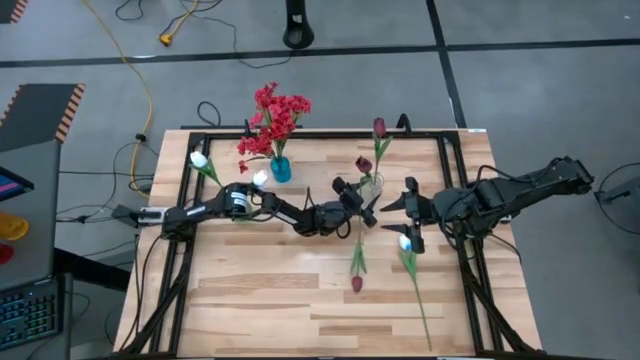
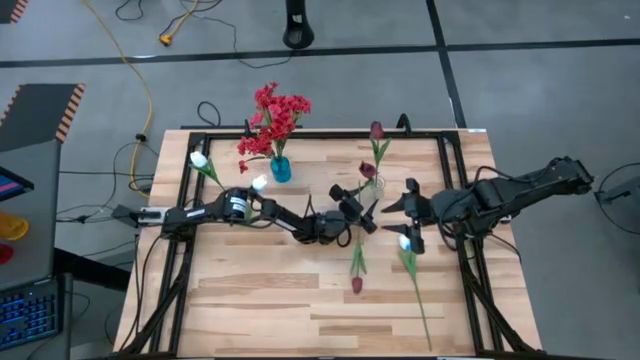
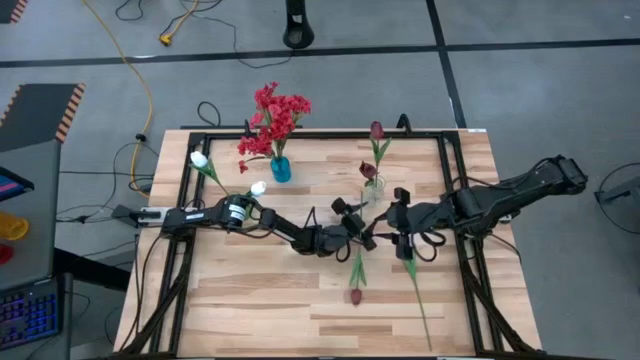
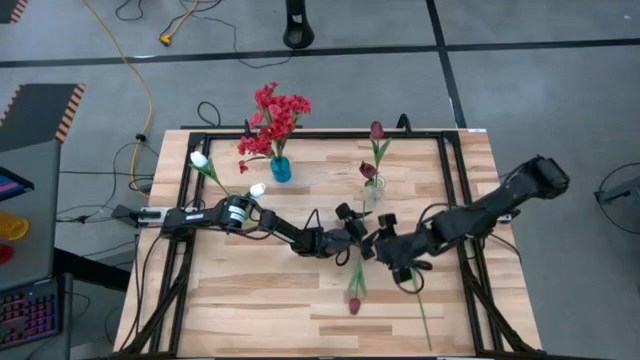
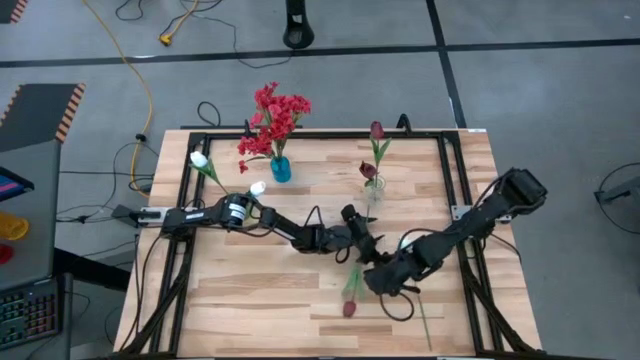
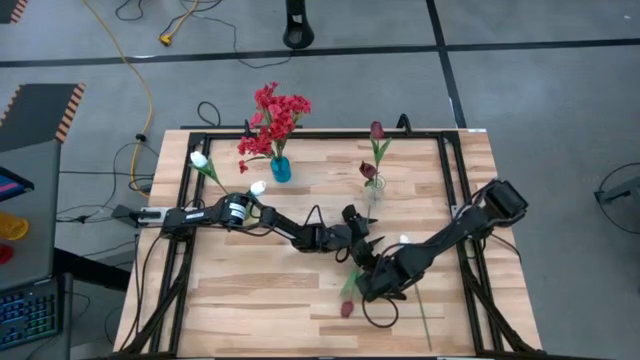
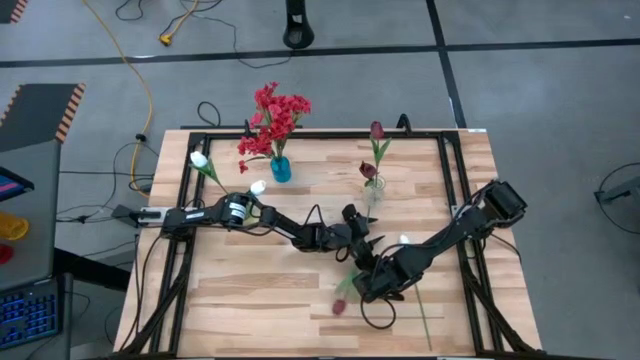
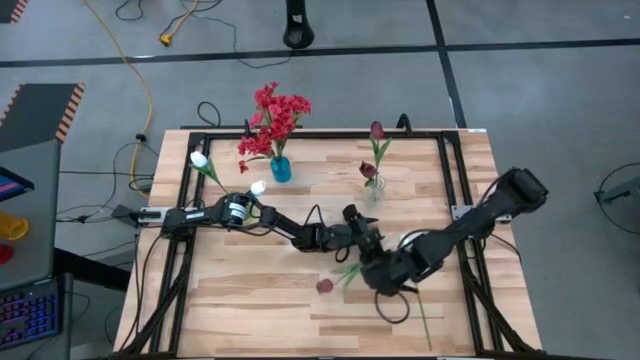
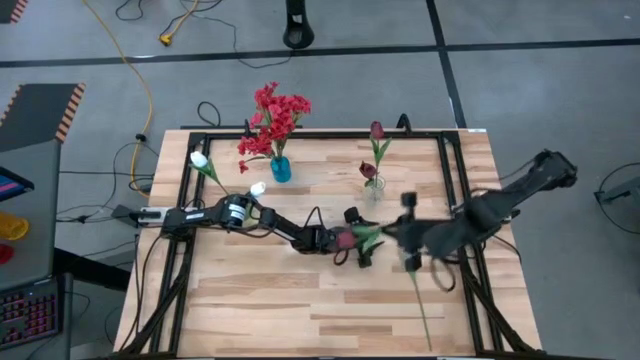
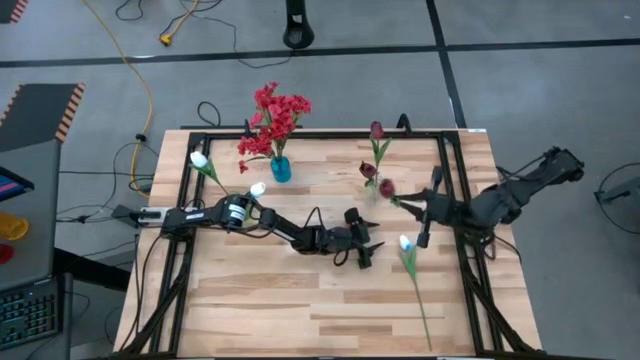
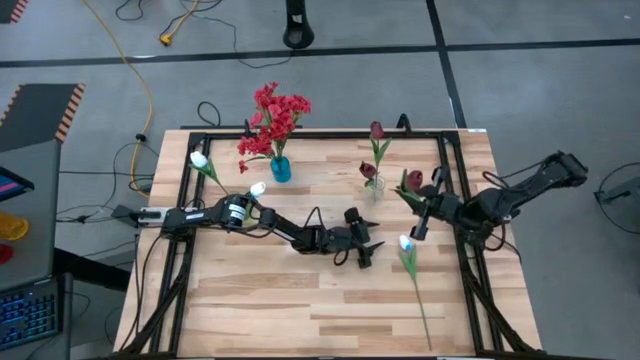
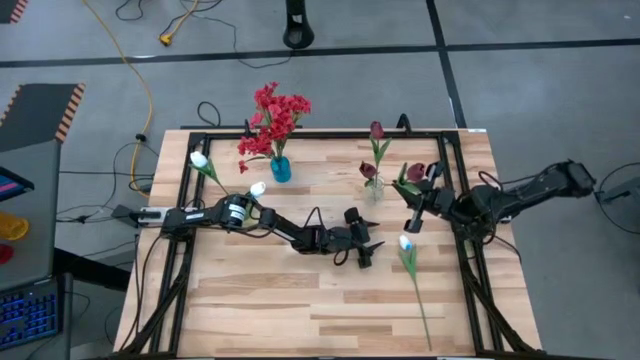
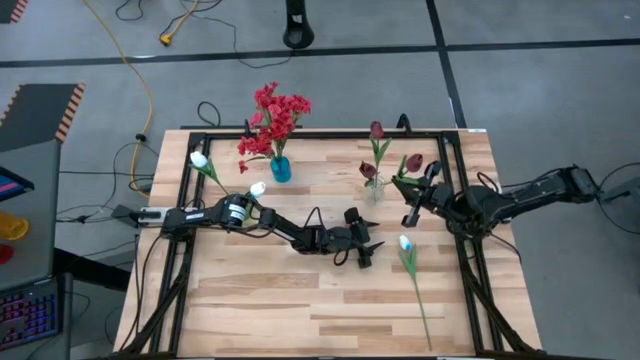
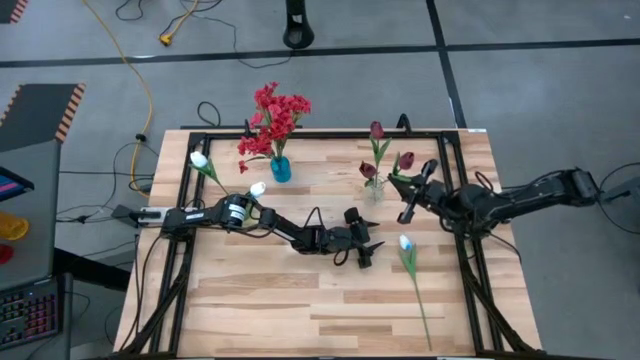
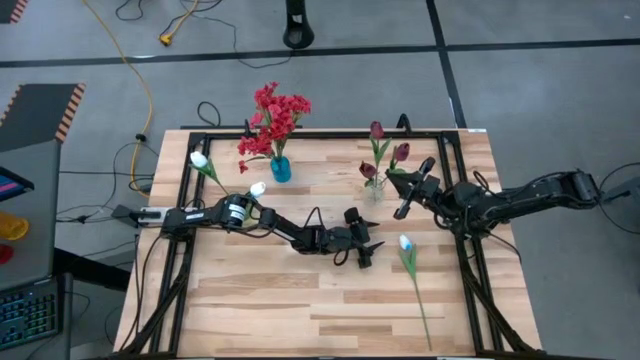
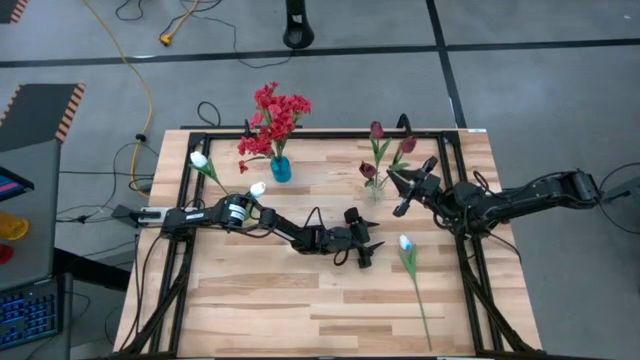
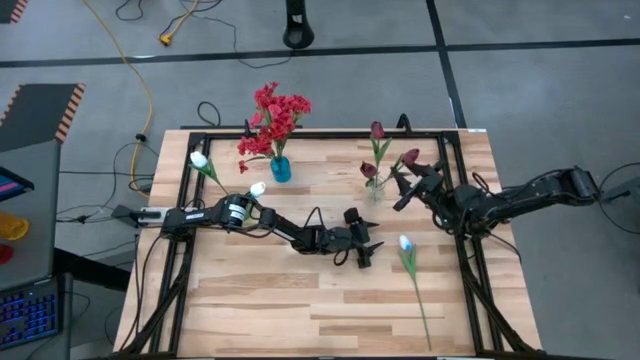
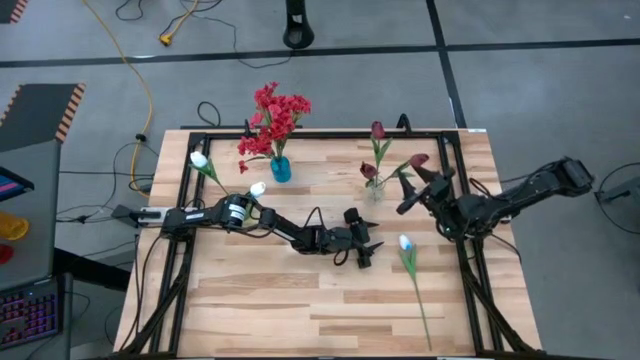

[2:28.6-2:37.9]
Task: Sort flowers into vase by color
Put the red tulip into the transparent vase

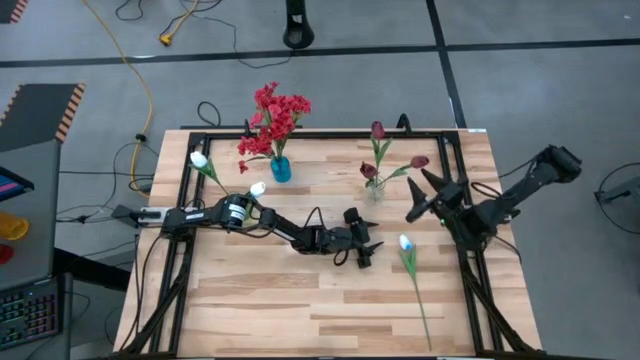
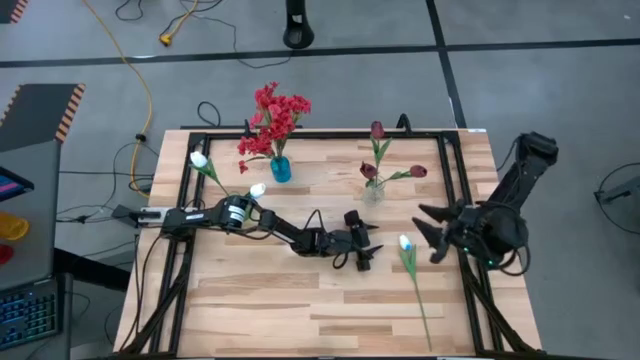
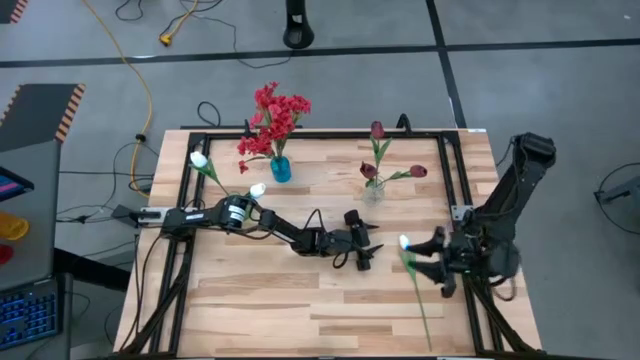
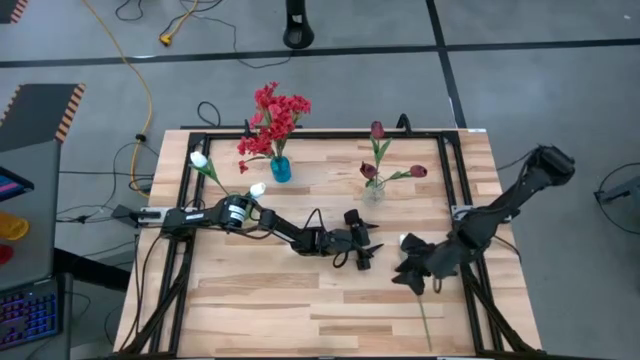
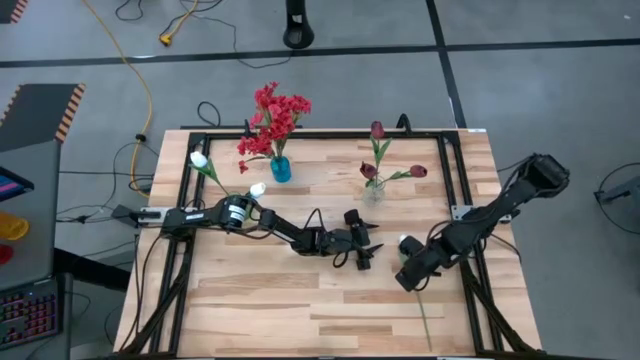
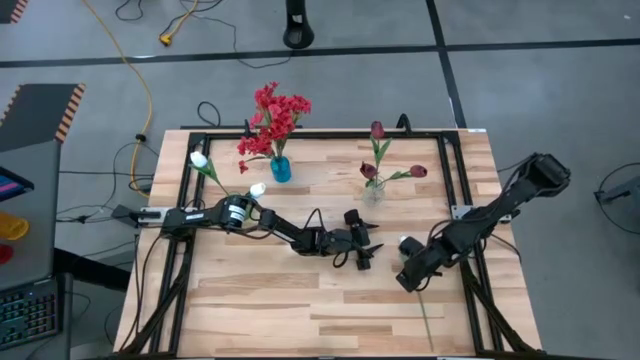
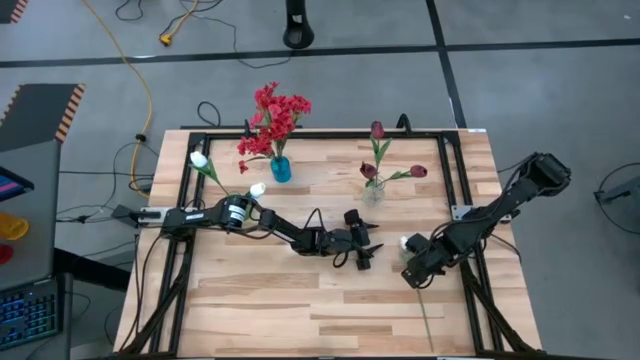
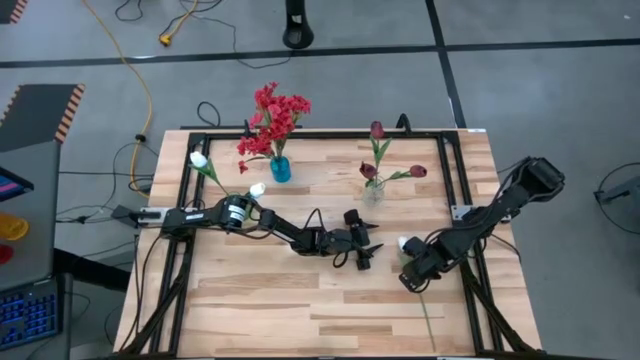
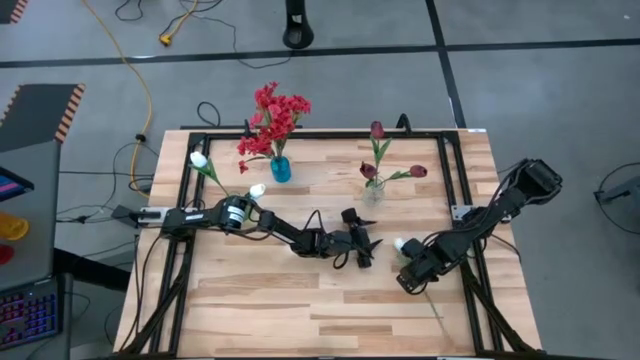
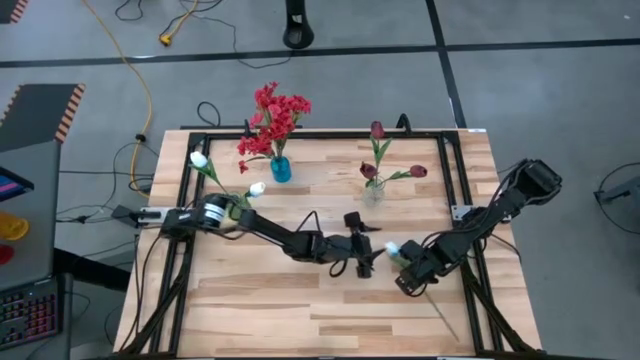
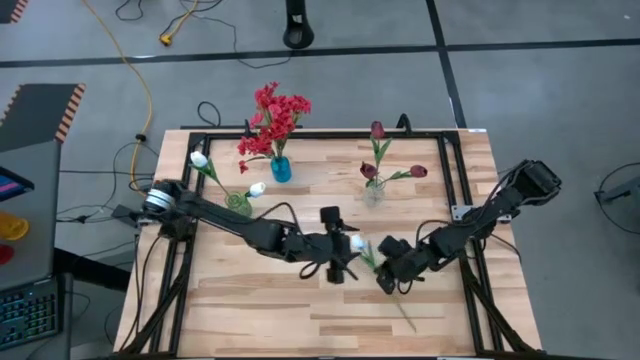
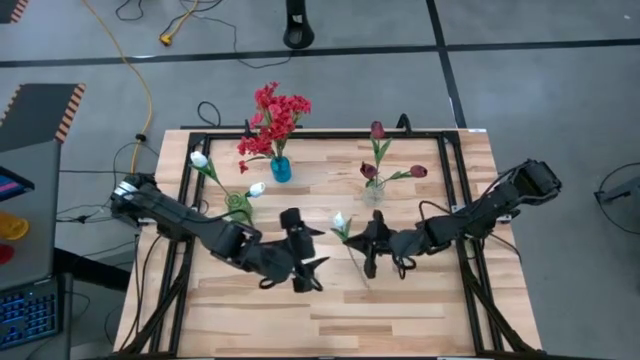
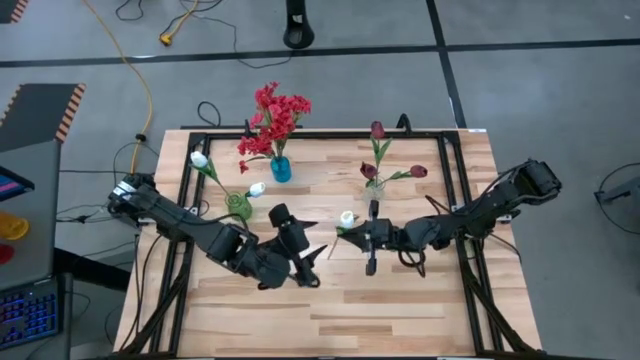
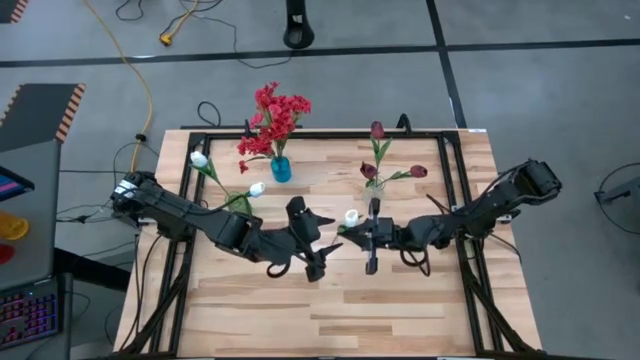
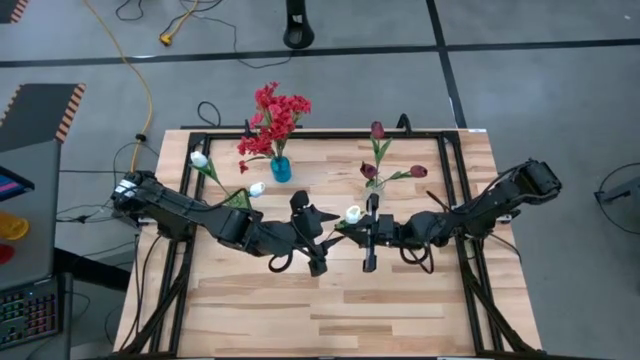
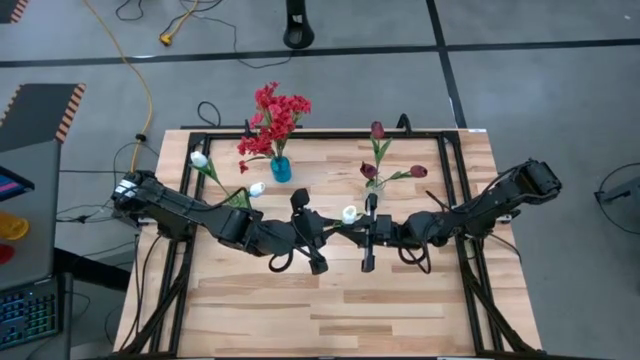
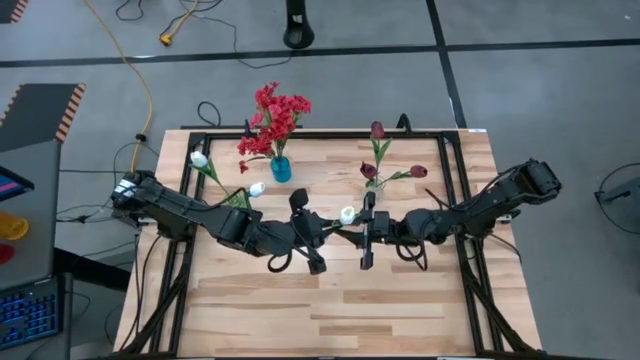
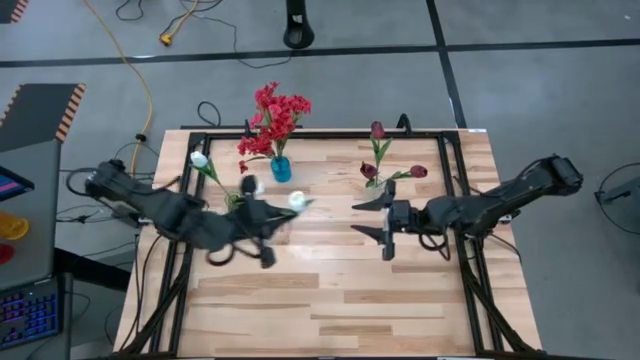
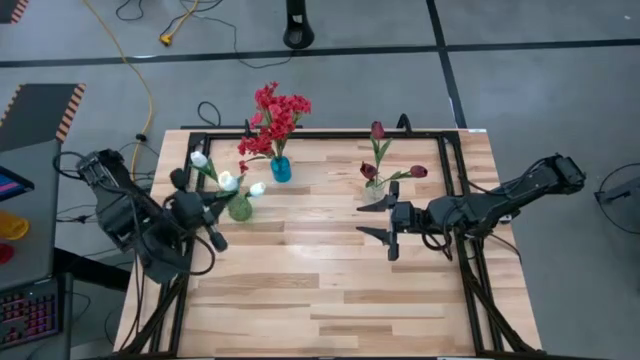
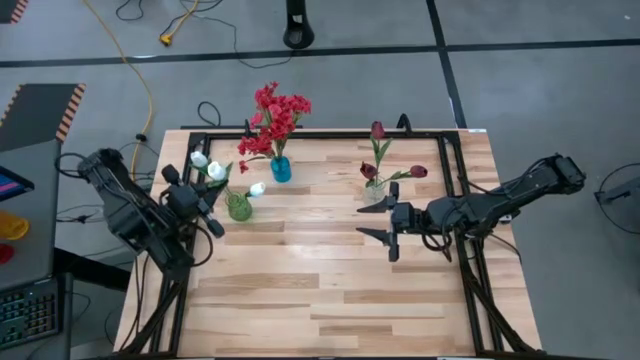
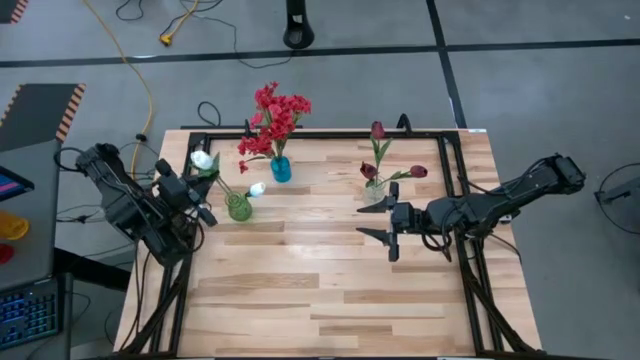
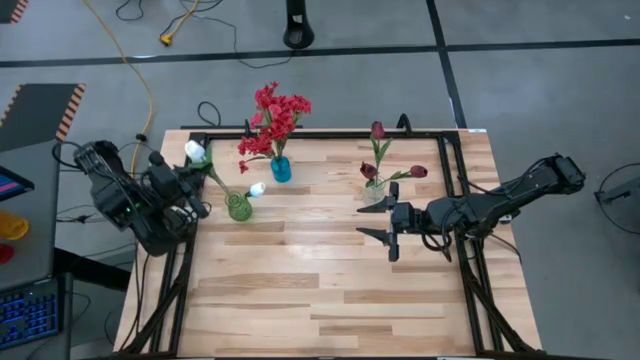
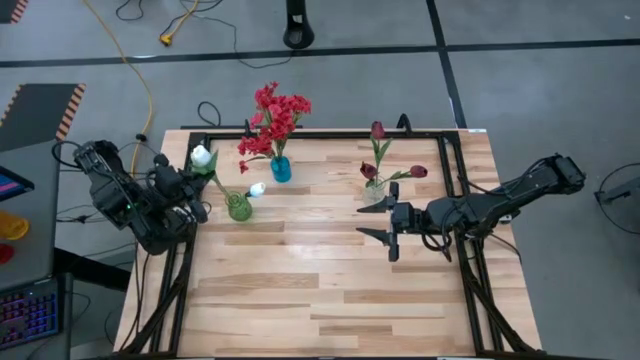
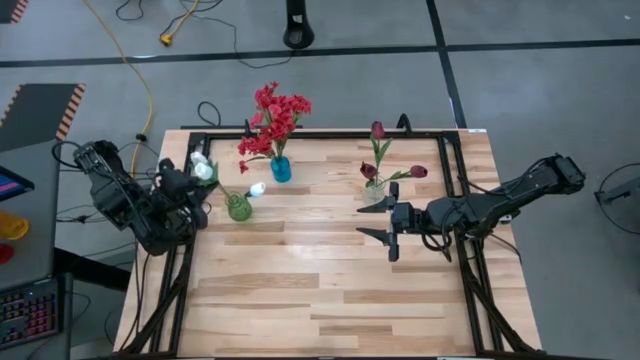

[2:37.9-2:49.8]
Put the white tulip into the green vase
